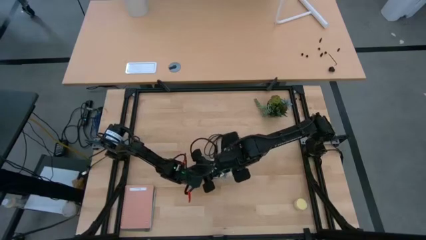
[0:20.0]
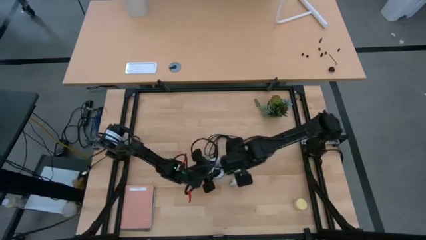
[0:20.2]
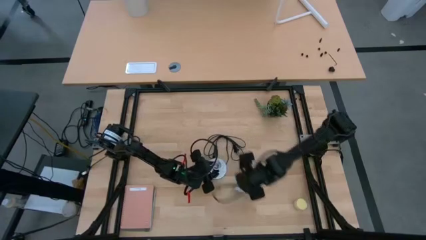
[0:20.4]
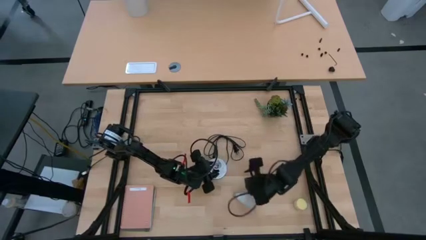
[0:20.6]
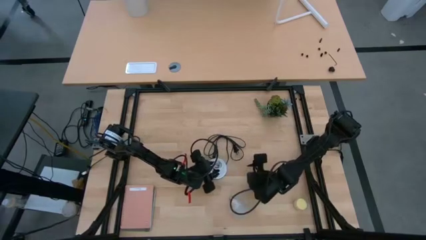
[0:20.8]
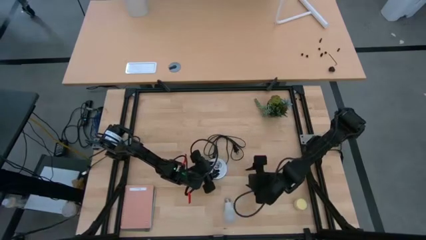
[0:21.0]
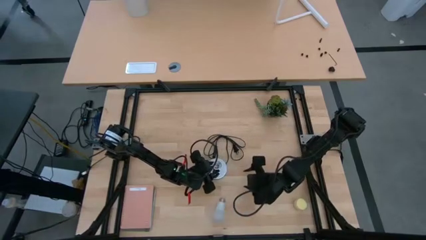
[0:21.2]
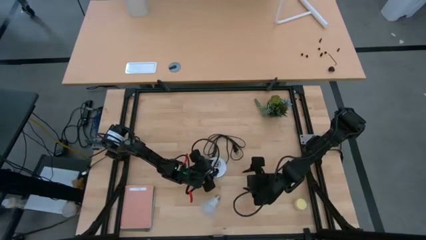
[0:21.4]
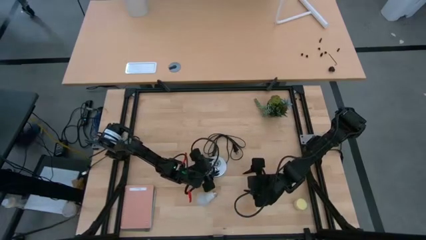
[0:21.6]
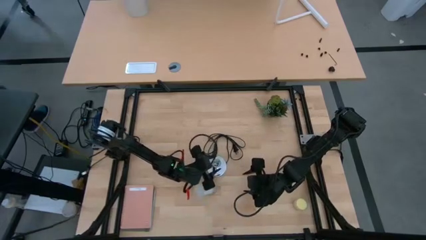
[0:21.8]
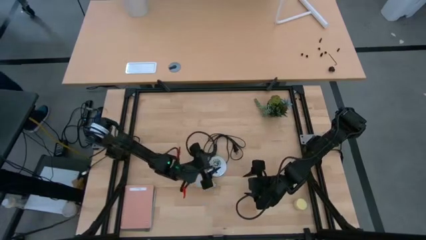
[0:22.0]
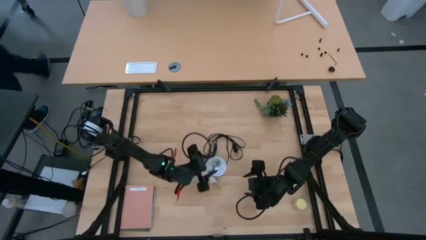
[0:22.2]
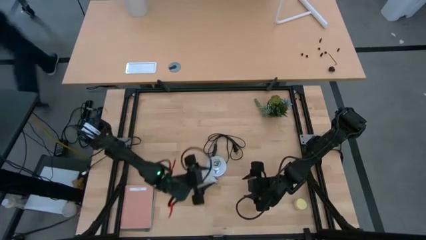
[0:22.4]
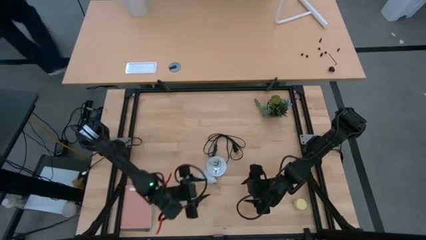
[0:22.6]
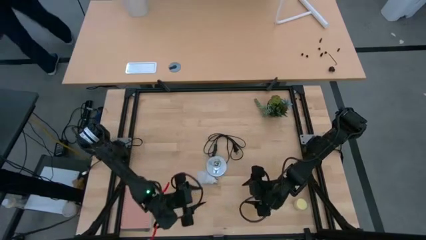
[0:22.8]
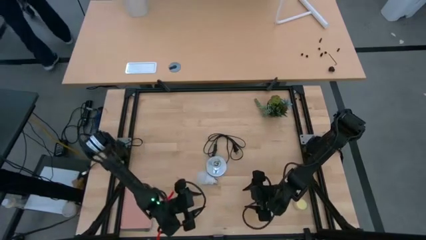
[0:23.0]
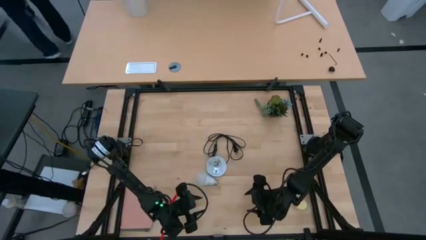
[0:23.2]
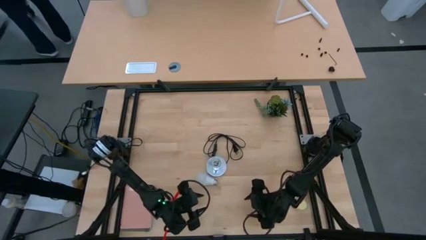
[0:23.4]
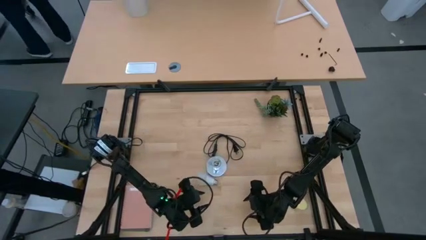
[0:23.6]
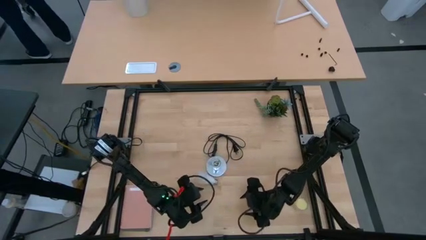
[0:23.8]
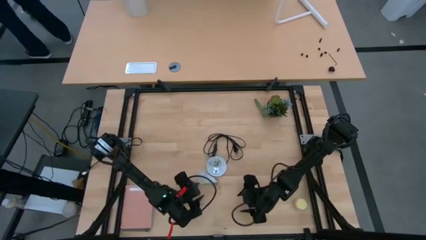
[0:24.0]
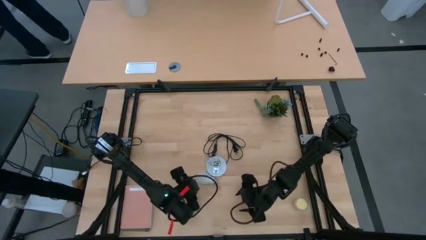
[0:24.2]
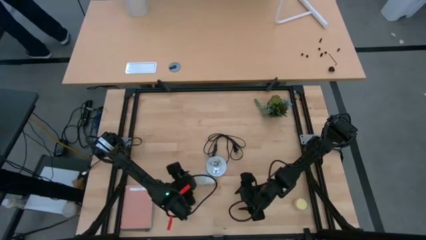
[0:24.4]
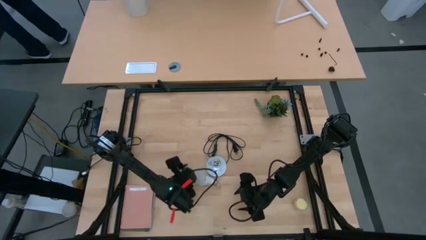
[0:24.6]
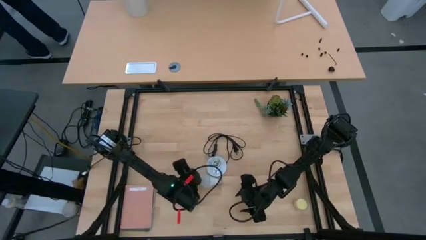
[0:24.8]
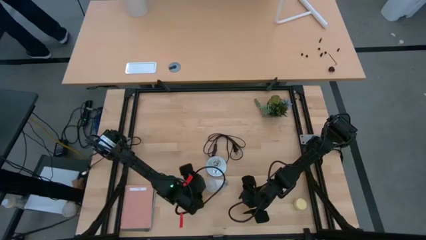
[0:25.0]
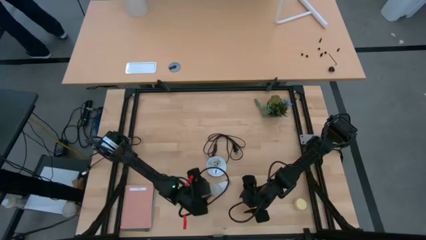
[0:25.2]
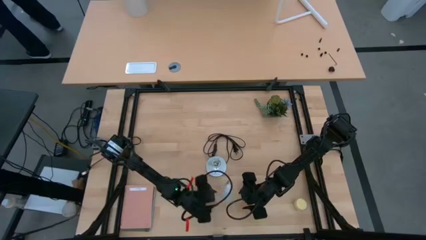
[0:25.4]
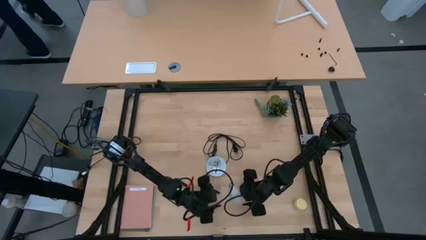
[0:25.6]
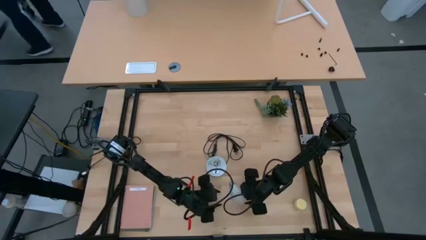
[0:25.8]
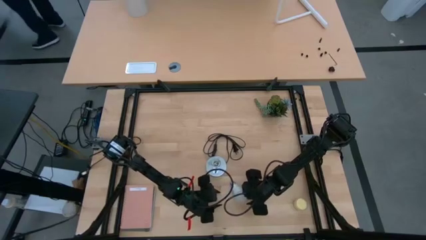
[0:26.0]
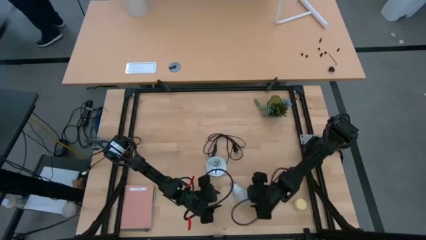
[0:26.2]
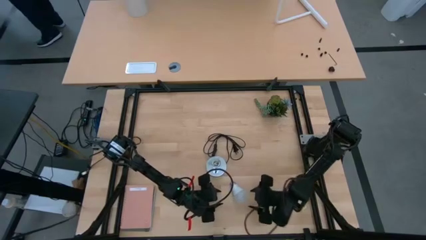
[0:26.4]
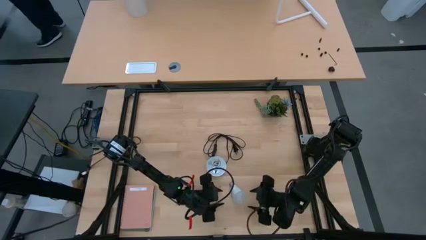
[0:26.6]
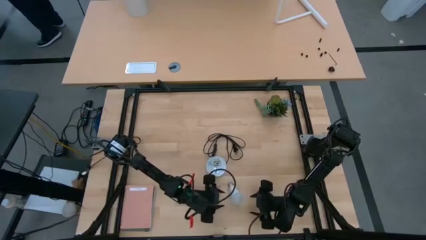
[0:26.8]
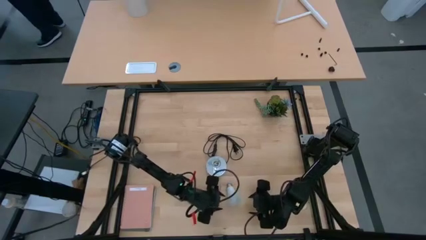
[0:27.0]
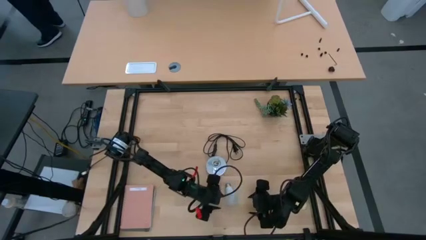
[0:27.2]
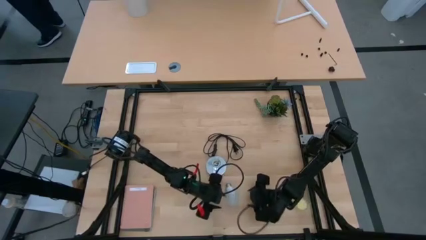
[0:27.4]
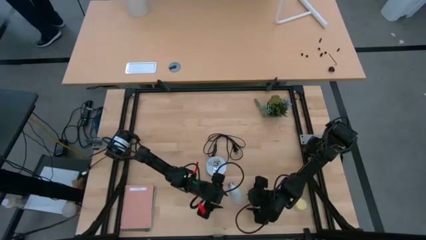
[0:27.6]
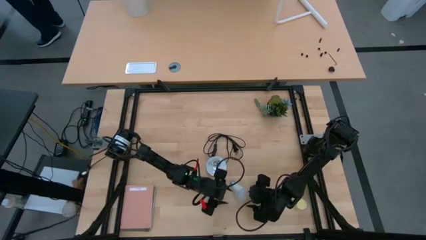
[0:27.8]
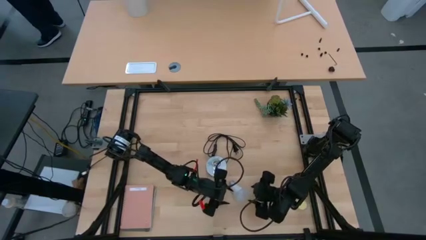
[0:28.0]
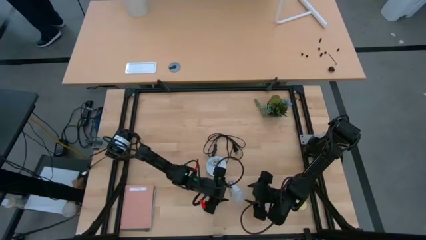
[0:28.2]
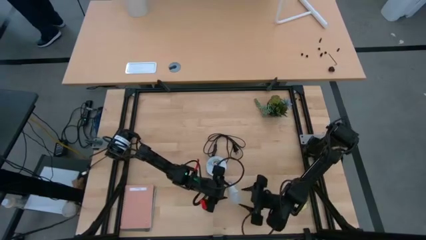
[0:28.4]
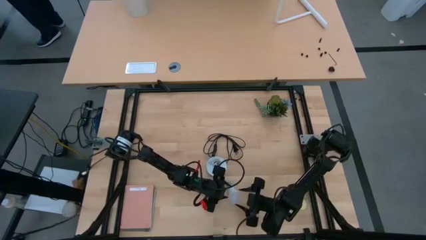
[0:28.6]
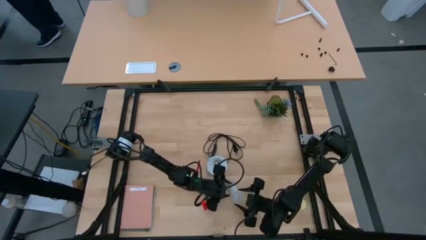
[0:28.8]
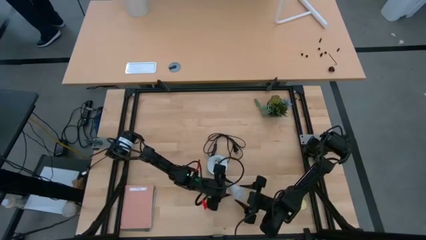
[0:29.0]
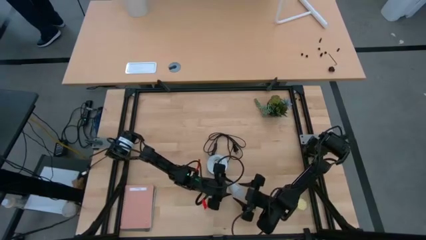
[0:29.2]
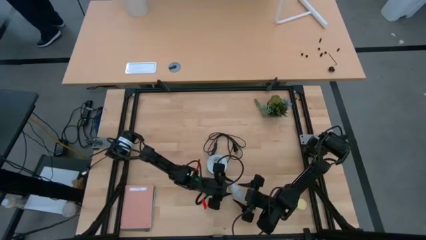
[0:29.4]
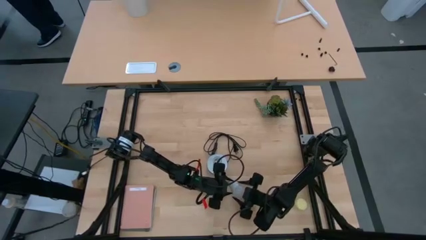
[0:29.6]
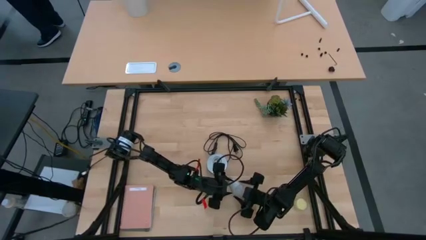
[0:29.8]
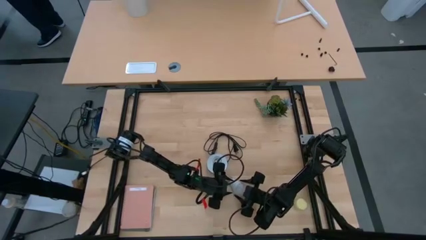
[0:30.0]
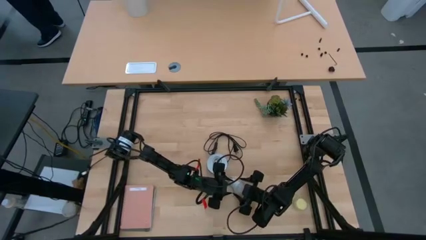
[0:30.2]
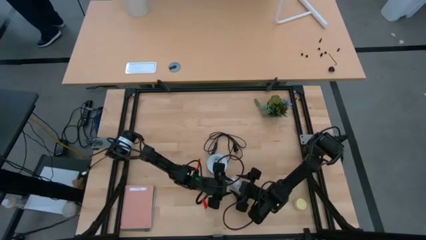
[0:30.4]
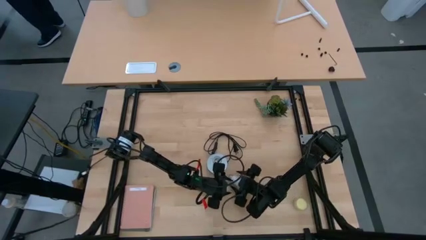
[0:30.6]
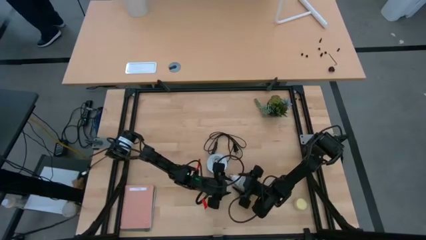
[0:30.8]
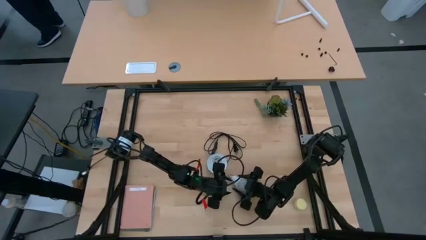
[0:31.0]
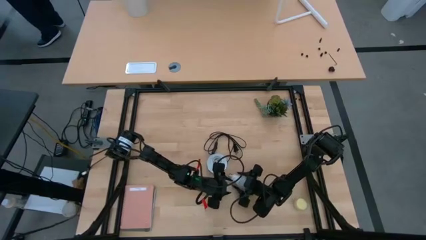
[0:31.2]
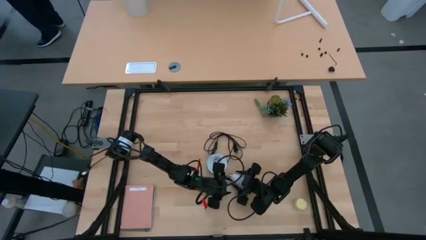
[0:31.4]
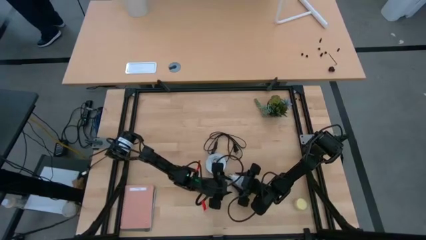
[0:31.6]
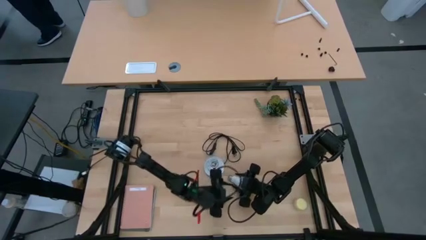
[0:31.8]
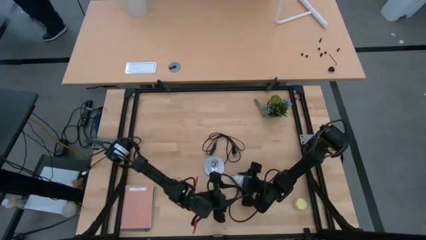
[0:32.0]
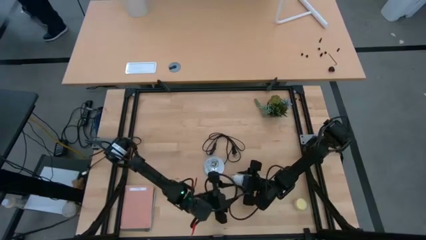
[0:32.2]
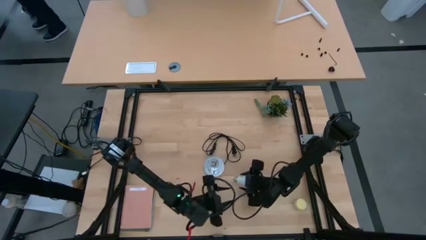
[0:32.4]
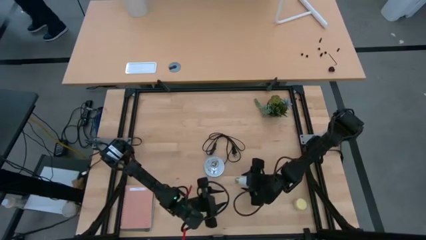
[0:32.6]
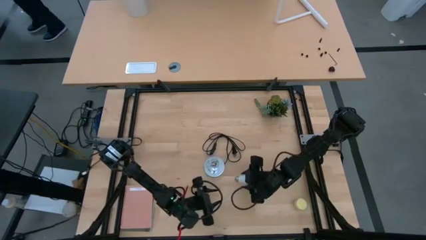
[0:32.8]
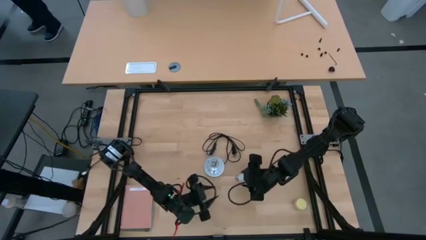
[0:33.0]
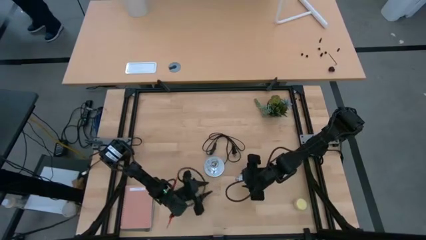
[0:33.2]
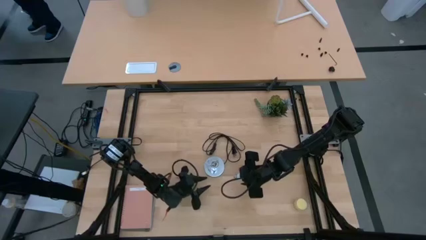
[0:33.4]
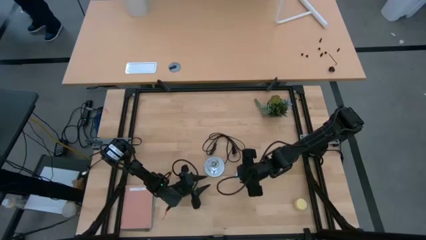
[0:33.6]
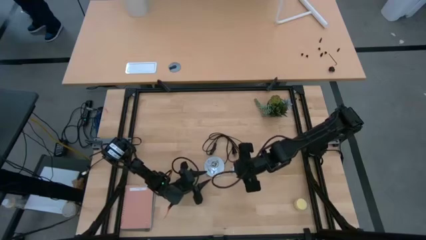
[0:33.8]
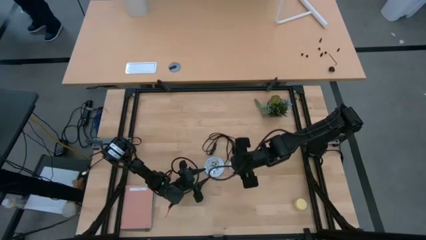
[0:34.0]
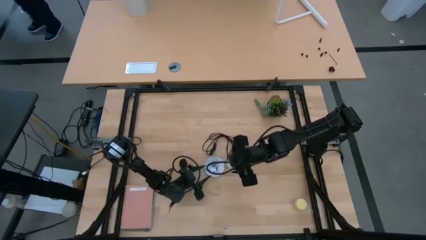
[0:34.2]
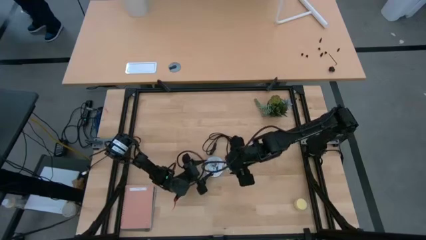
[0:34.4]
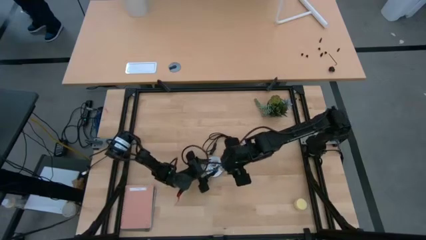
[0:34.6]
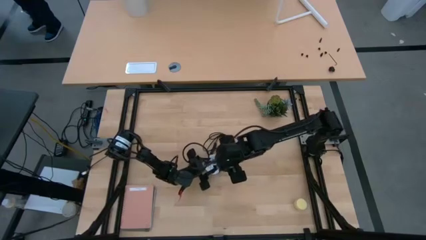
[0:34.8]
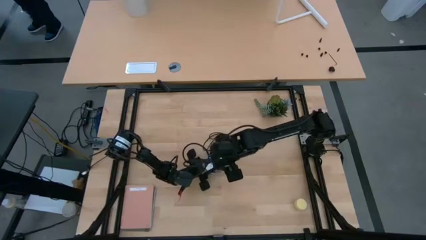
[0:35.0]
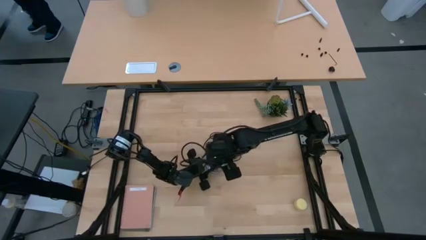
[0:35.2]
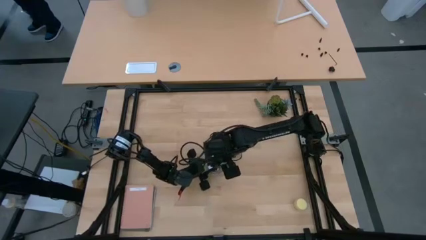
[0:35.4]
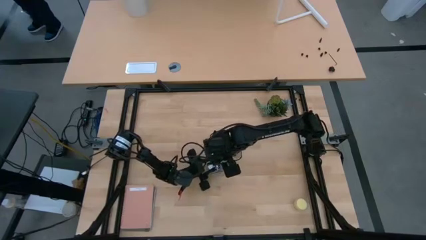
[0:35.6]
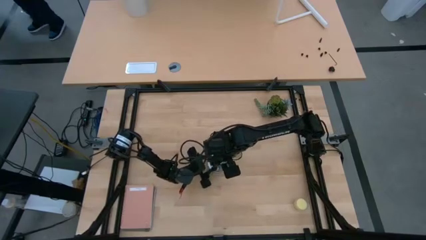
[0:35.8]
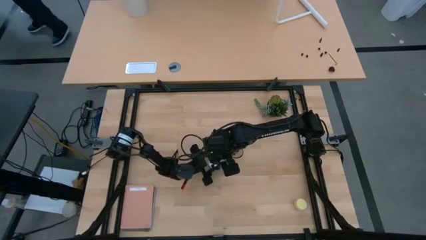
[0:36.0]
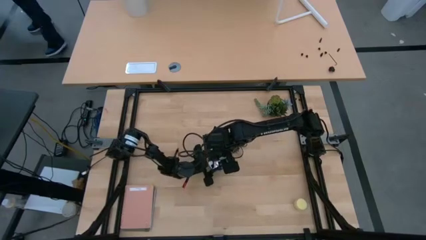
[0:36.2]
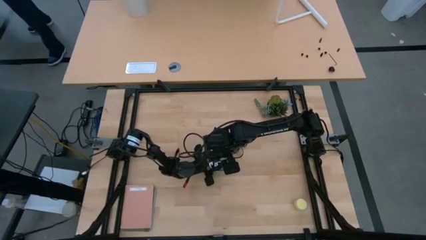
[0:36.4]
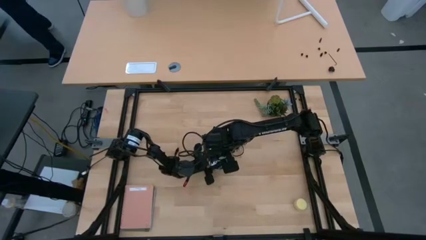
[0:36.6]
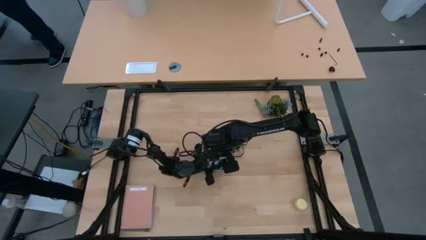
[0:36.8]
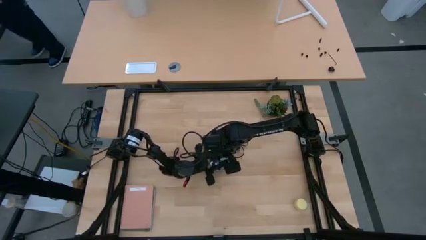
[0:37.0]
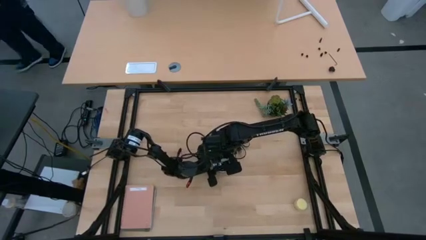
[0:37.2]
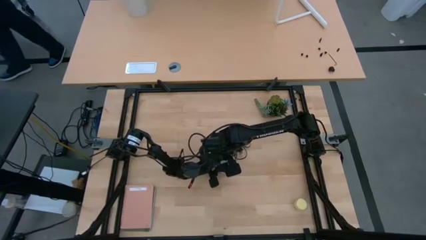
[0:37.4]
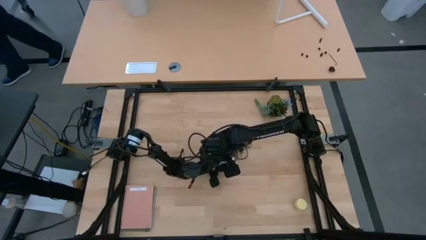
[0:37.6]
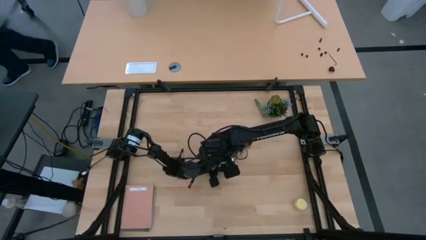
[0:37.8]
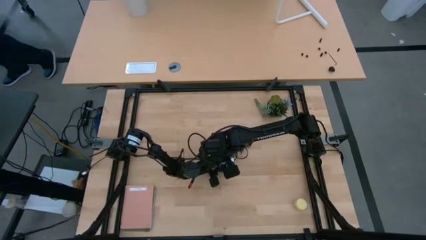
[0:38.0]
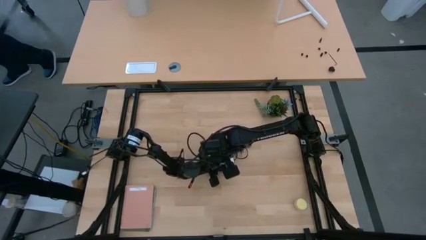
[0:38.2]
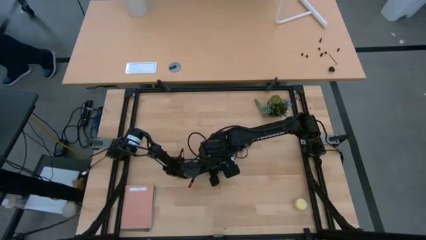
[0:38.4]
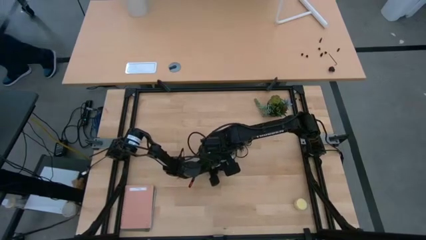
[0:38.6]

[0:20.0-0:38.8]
Task: Screw lightbulb
Insert the lightbulb into the silver lamp
